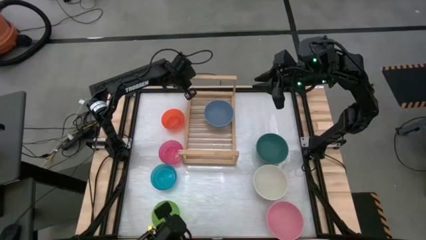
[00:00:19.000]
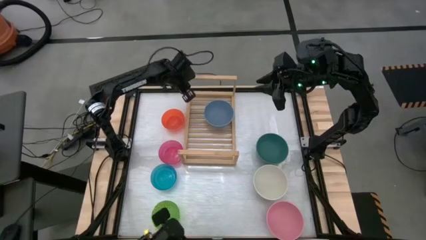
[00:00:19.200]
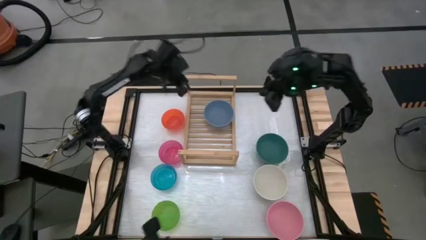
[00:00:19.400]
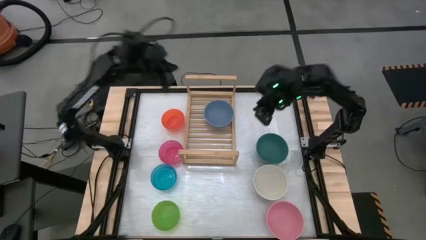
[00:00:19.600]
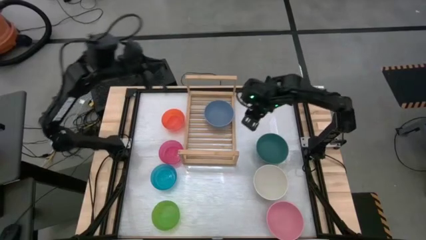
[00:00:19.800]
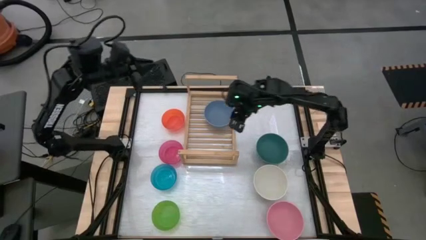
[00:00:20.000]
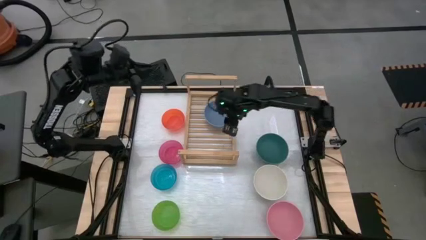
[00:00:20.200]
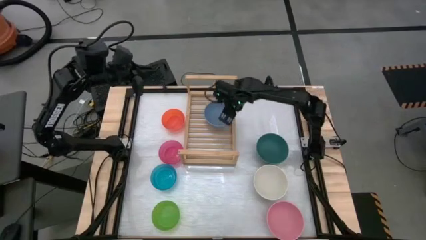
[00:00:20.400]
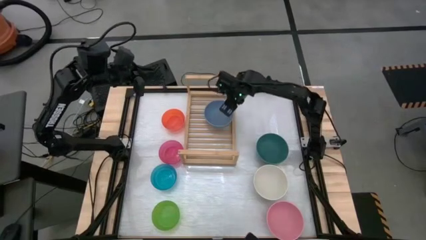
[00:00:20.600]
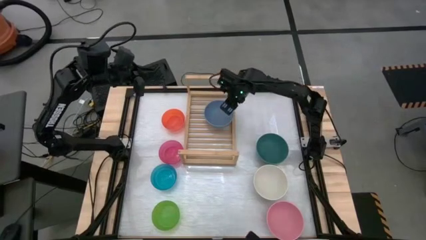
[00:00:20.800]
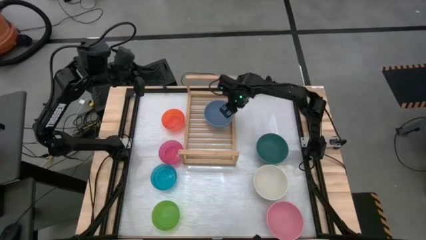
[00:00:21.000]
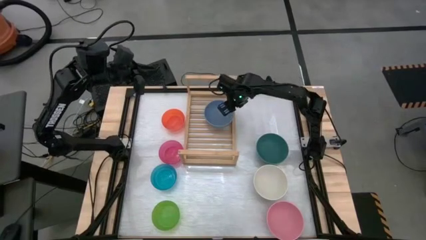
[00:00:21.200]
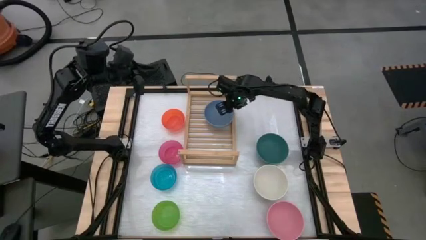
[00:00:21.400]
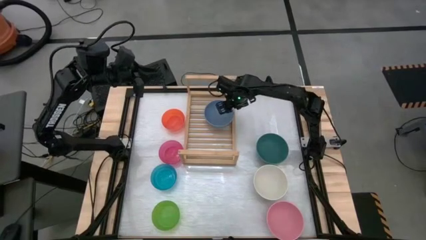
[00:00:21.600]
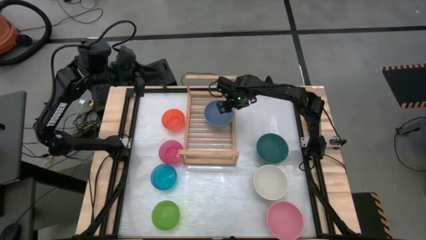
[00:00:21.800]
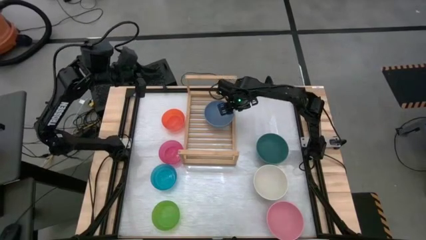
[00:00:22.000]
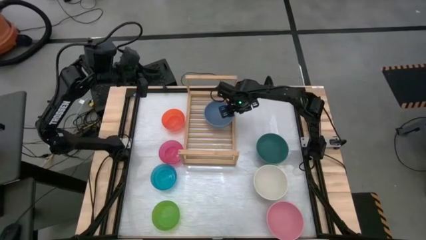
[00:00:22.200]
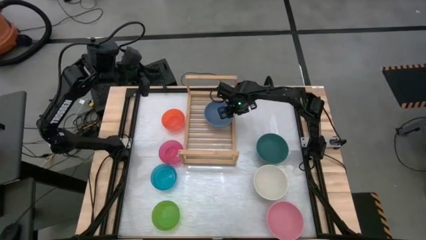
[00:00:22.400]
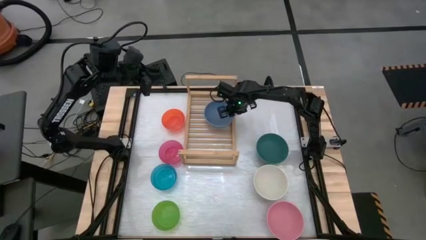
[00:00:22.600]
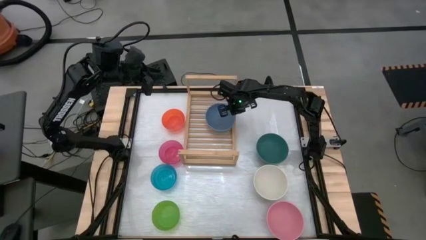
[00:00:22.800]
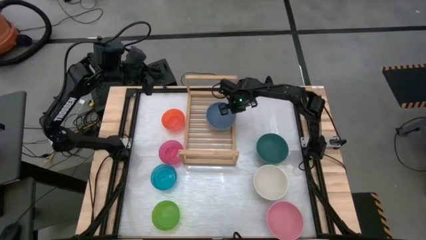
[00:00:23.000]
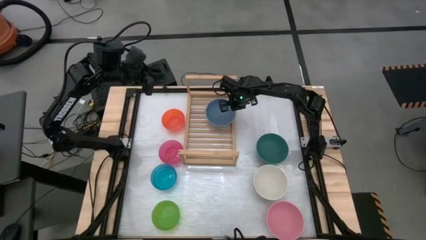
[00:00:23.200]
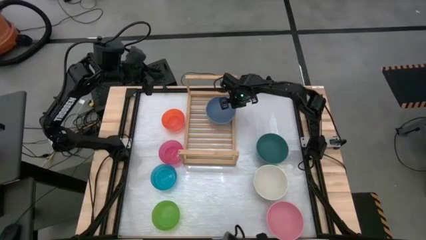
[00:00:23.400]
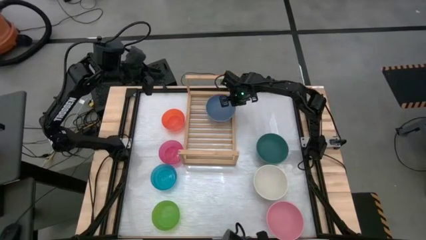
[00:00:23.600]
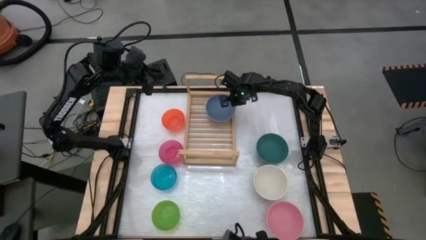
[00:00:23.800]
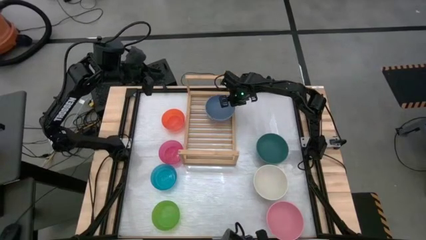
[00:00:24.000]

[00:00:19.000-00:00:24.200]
Task: Place and stack bowls onto a shelf
Adjust the right blue bowl on the shelf

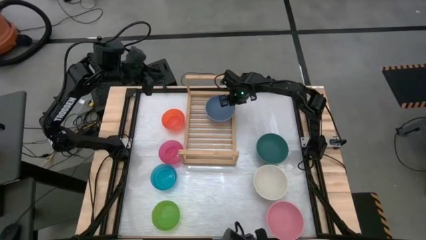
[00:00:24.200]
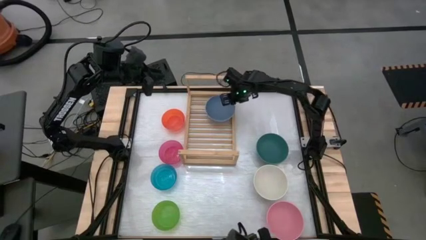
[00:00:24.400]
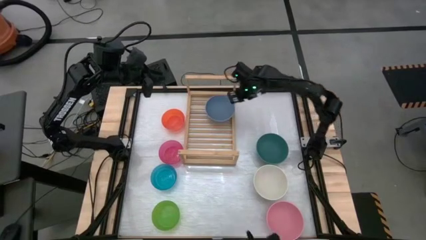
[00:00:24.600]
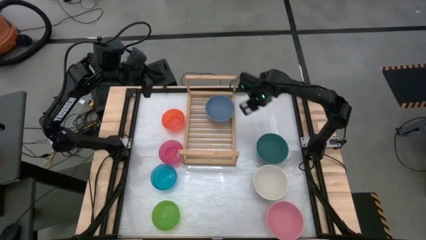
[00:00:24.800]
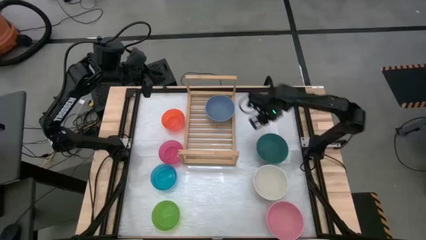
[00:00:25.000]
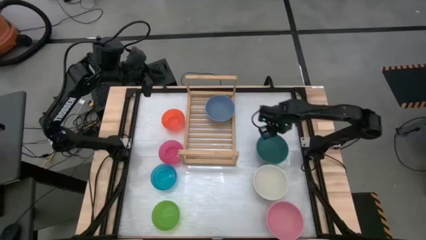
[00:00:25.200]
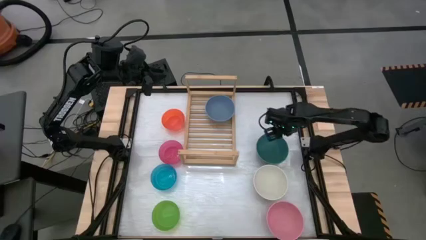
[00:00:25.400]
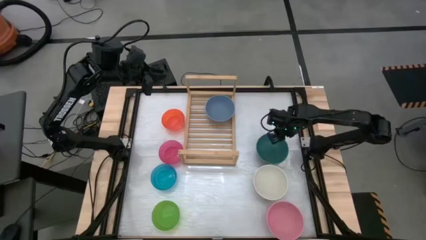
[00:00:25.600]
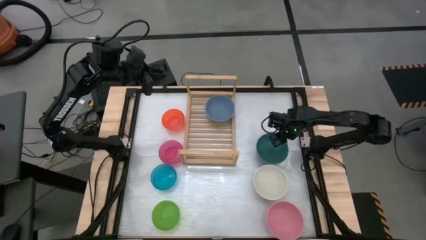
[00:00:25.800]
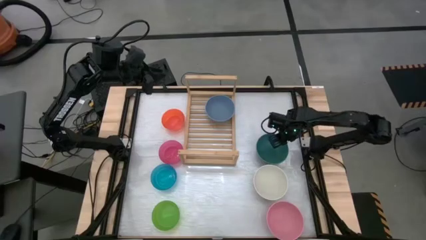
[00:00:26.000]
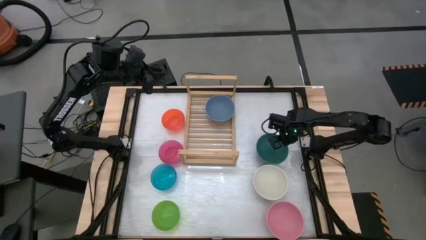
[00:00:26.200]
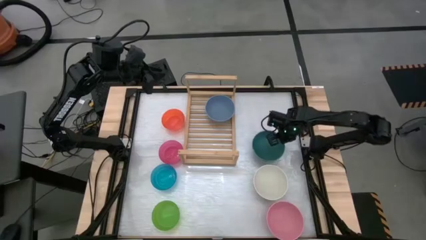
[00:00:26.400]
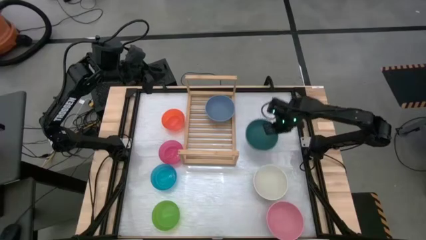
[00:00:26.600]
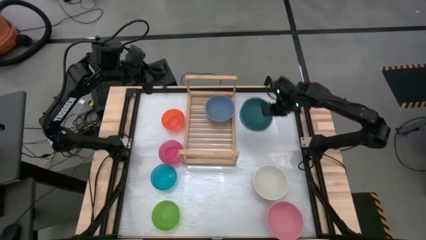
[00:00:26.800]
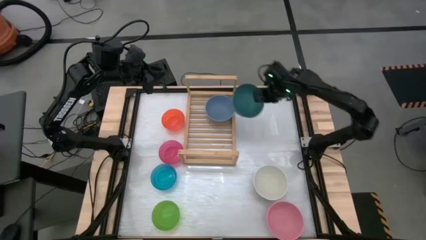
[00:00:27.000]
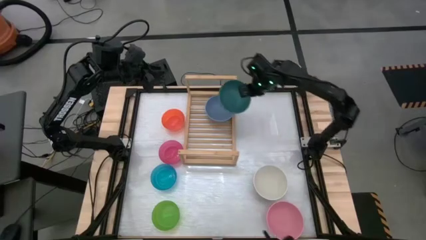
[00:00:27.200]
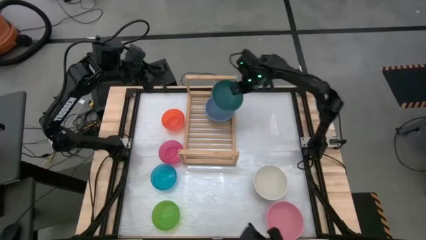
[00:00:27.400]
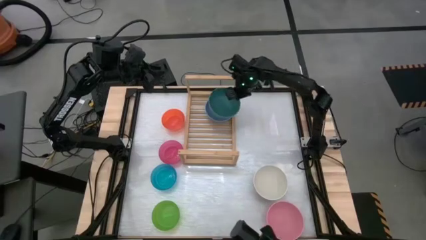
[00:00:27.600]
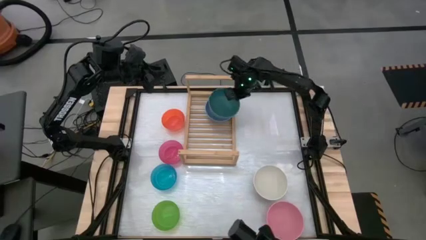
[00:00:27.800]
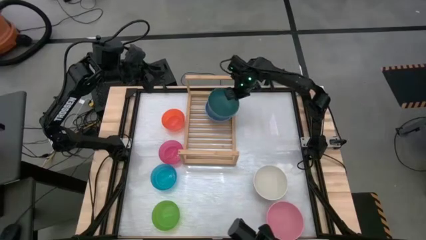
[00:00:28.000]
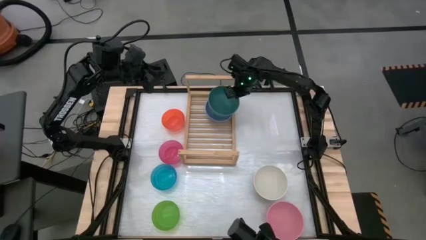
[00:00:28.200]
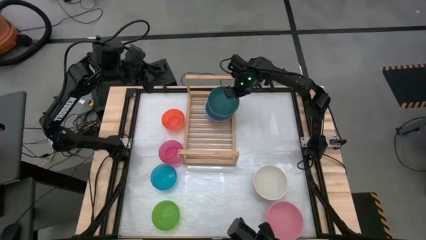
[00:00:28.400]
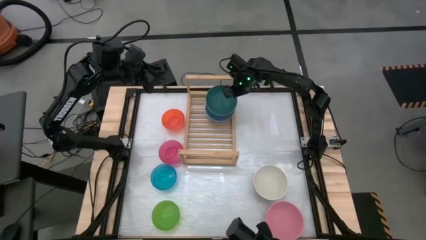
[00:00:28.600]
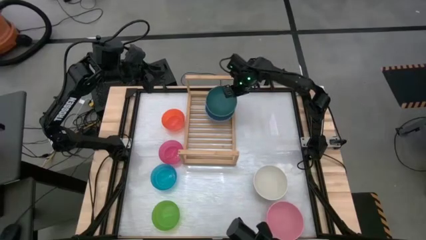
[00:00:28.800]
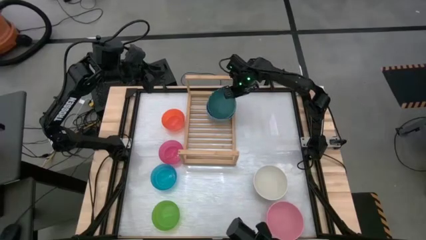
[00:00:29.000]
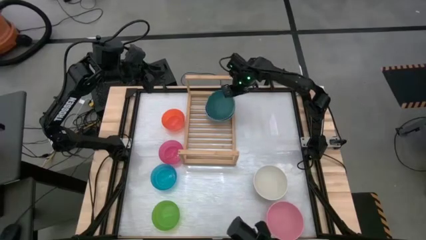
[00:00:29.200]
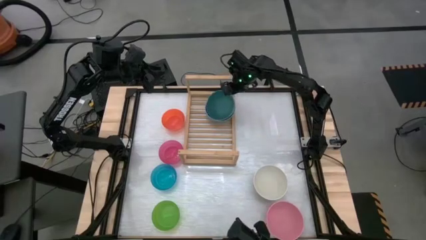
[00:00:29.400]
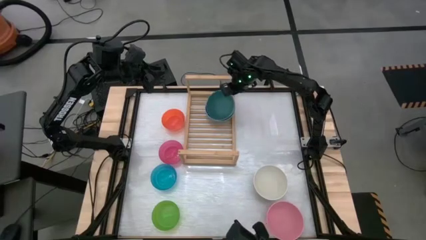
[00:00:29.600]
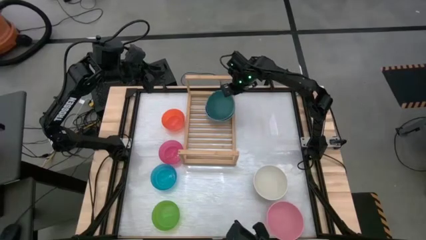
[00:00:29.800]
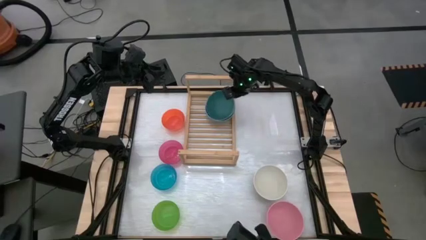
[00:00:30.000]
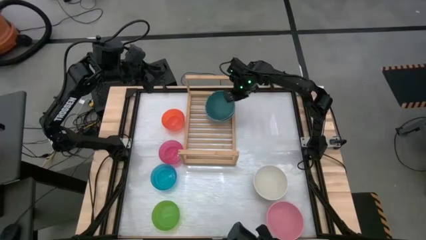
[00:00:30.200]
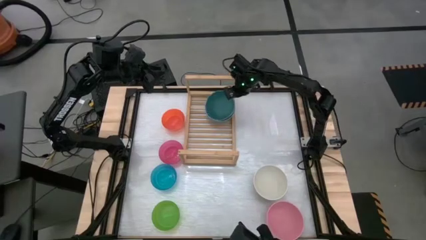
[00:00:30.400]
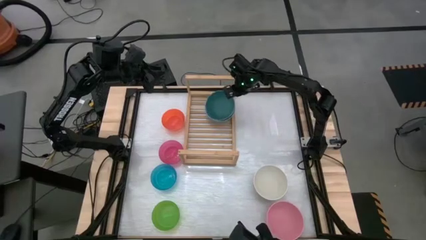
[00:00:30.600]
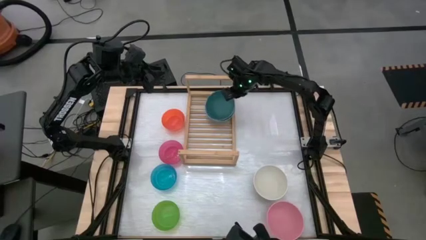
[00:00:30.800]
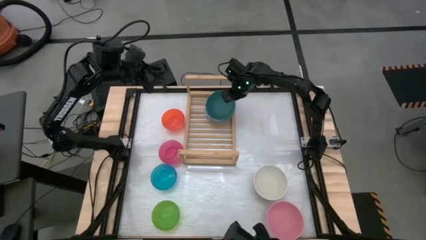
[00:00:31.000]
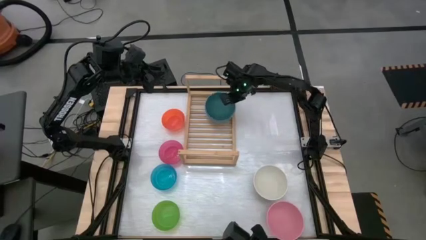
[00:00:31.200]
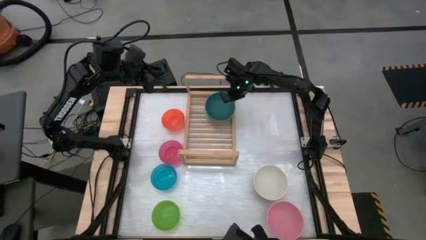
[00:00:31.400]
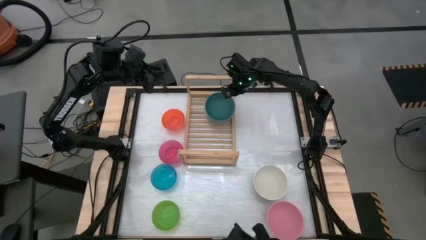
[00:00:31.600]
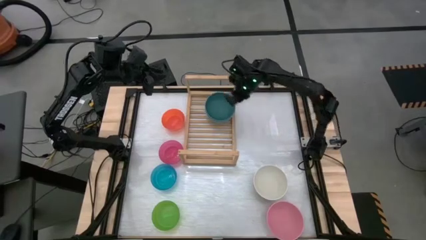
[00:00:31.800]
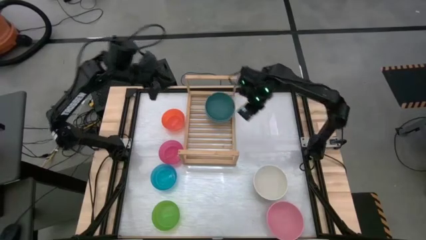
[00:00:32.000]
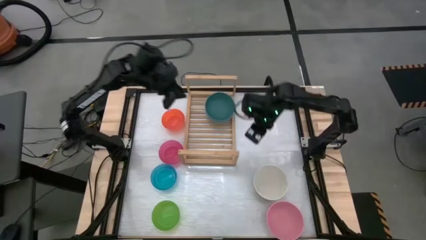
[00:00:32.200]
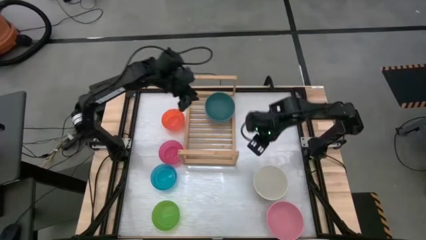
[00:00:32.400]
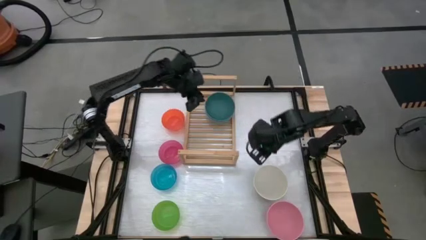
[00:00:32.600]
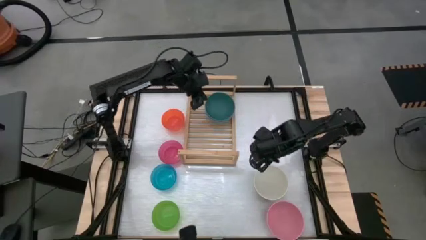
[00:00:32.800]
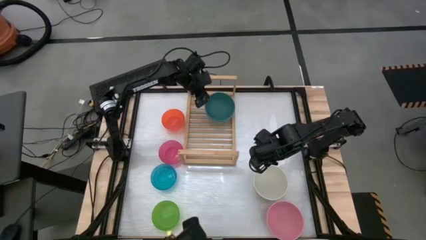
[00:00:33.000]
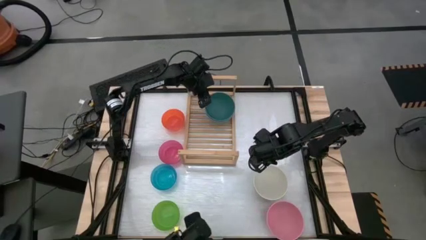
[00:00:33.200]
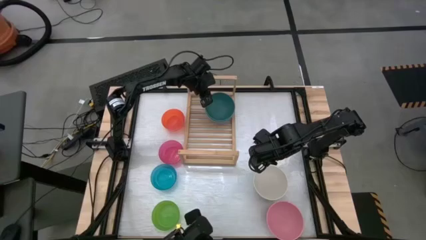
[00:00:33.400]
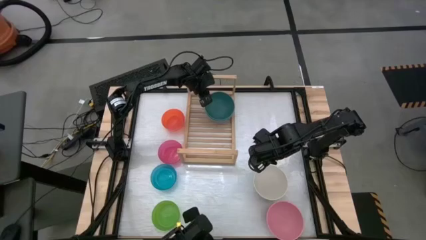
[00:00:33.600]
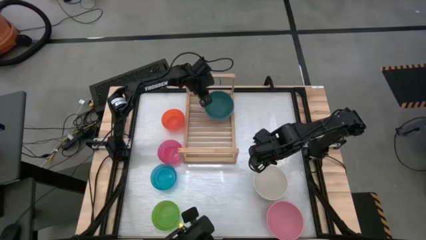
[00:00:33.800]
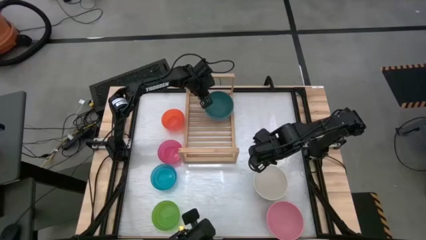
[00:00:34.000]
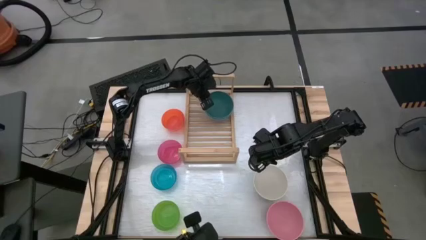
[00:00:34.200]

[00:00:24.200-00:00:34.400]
Stack the right green bowl on the blue bowl on the shelf

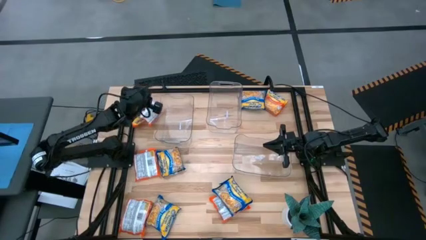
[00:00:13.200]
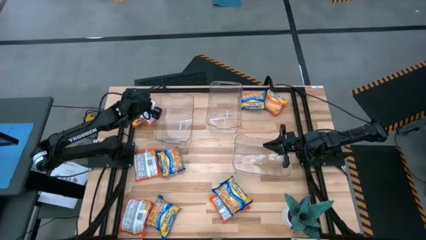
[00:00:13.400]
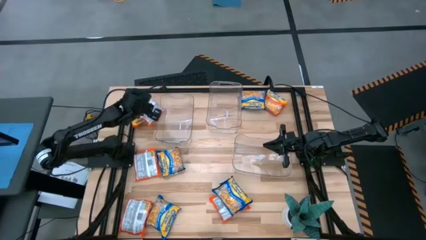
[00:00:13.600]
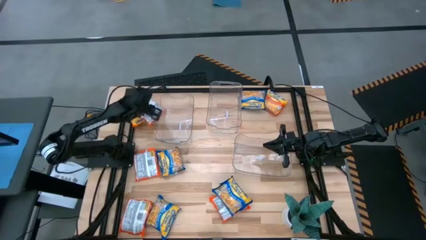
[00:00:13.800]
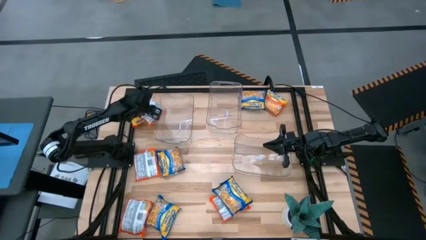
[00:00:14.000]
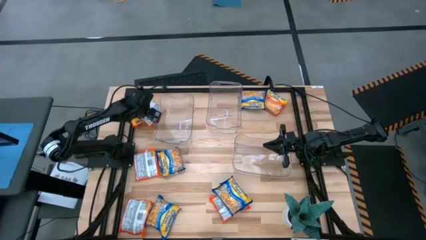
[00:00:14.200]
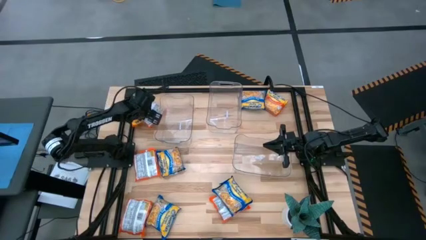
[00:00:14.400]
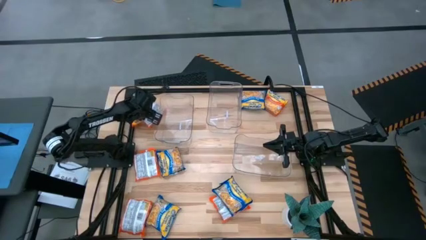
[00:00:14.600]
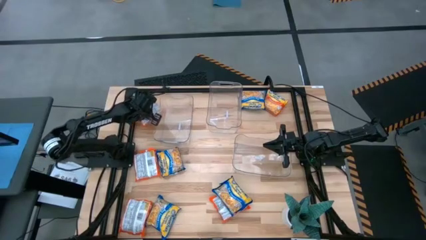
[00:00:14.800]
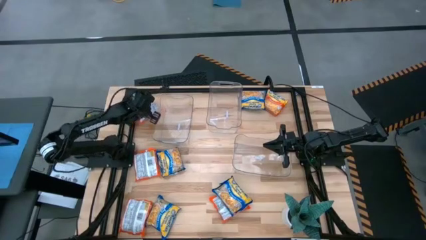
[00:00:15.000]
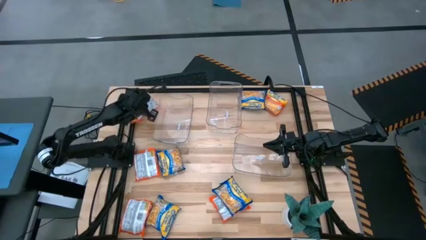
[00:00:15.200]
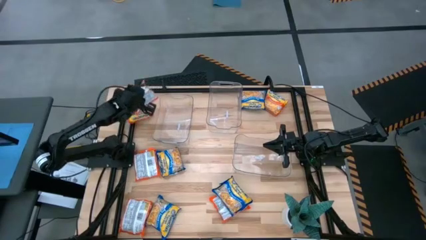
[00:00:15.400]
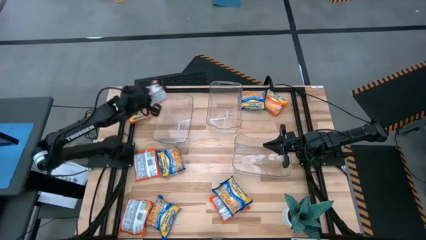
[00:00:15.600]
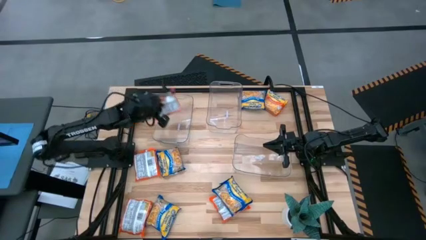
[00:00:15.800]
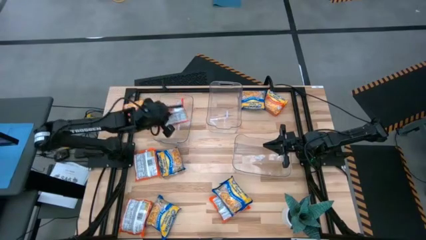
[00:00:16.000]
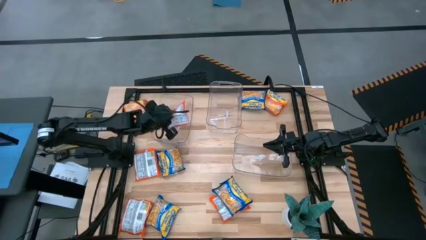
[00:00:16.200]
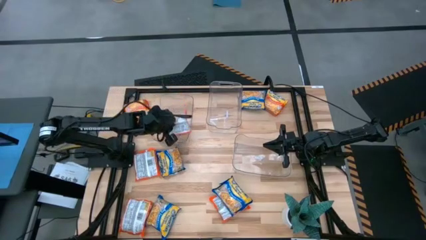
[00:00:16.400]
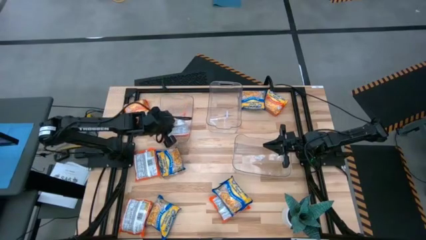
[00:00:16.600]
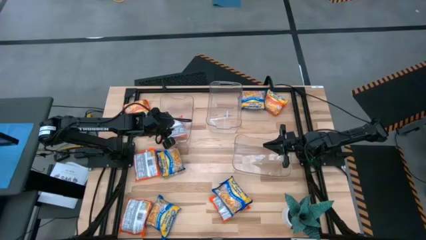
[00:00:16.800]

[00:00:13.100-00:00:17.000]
Task: Sort Maruchan noodles
Put the orange bag into the left transparent bin
